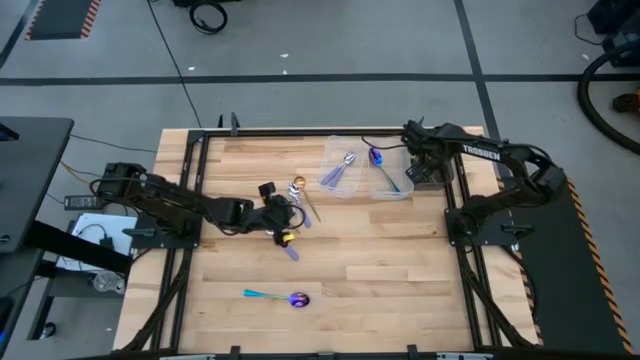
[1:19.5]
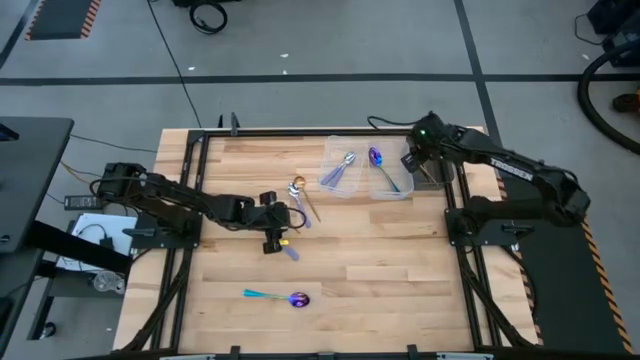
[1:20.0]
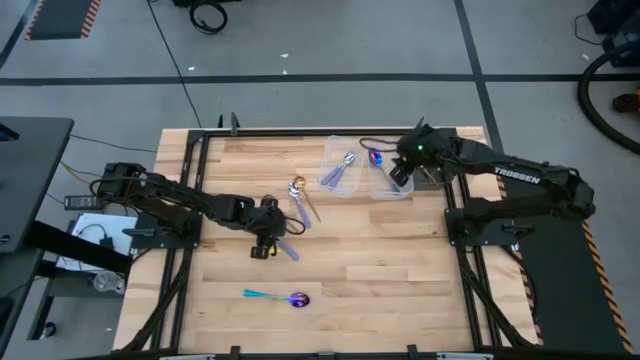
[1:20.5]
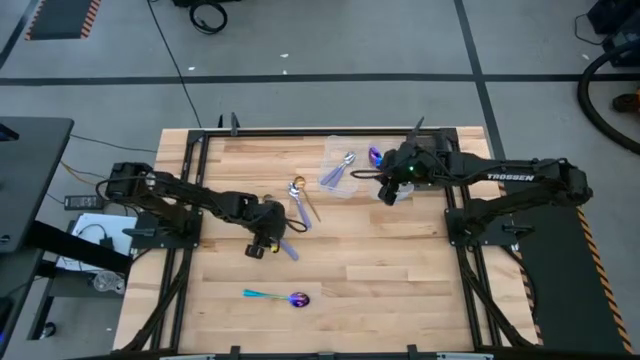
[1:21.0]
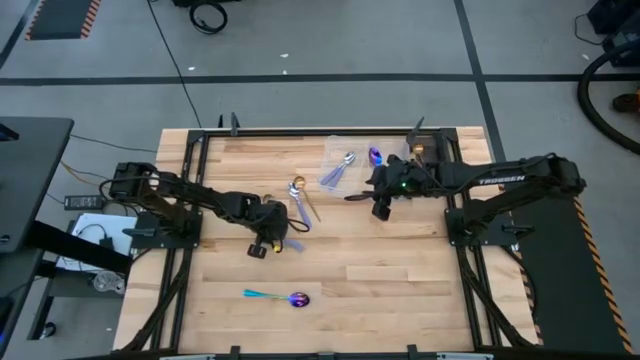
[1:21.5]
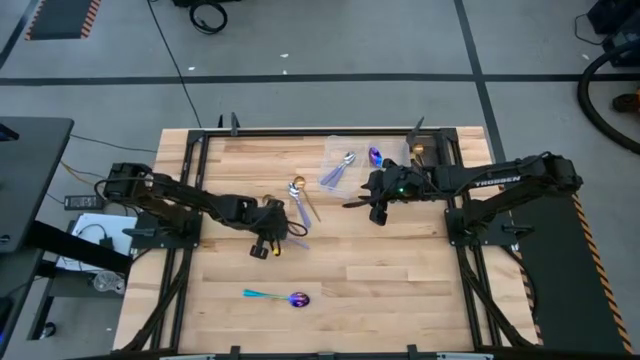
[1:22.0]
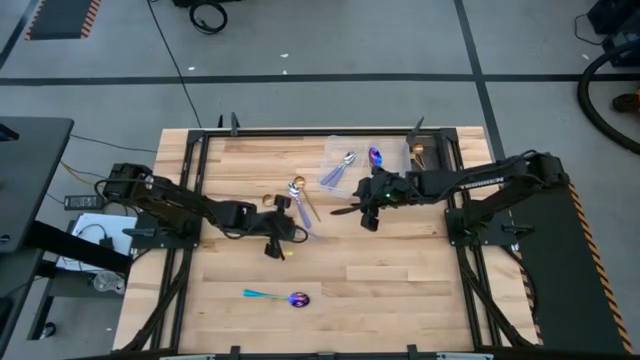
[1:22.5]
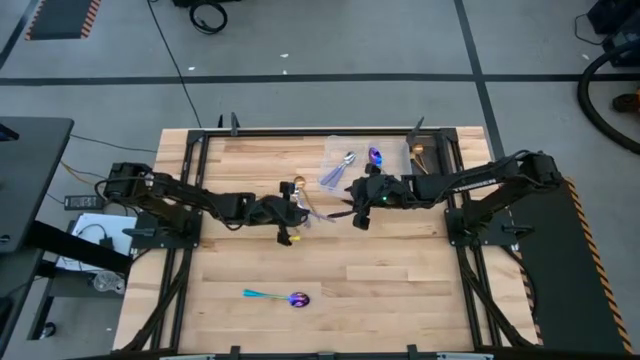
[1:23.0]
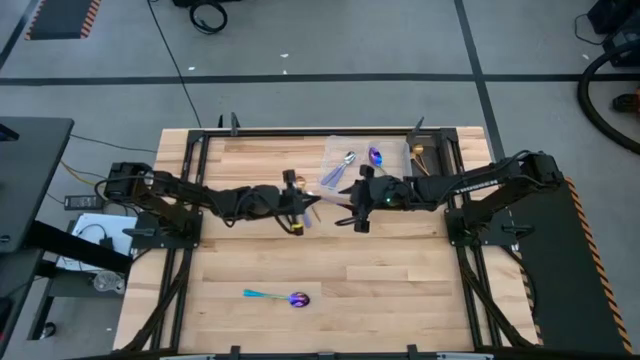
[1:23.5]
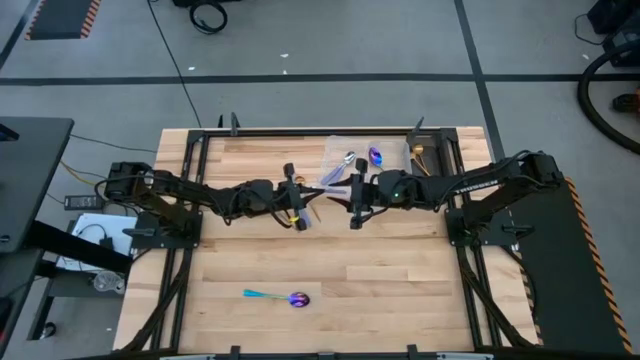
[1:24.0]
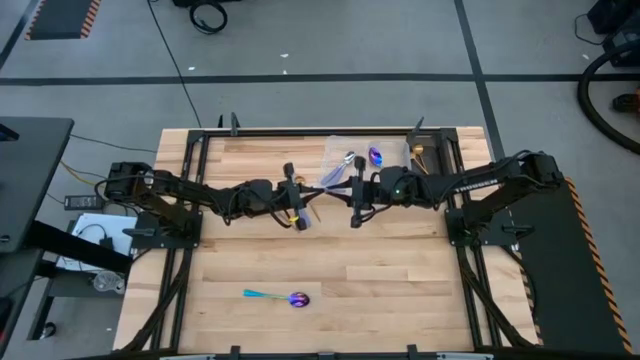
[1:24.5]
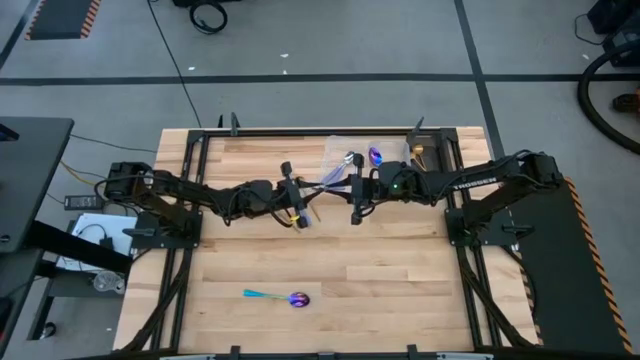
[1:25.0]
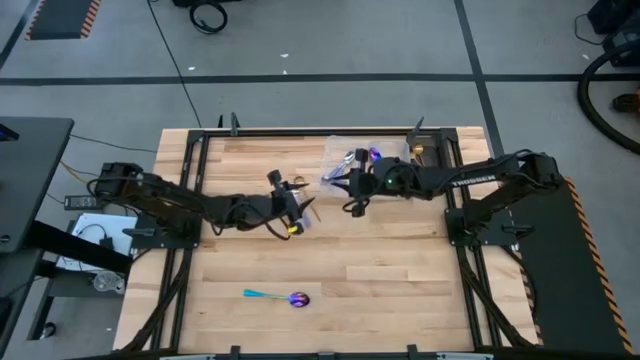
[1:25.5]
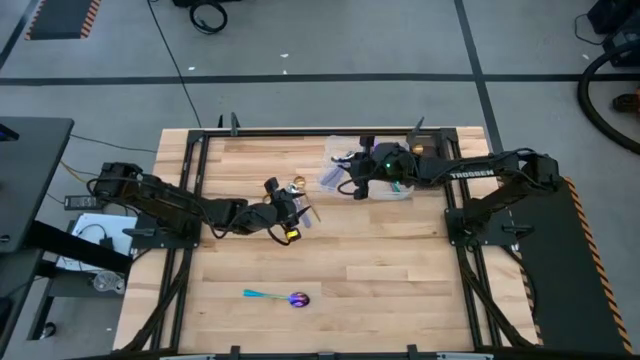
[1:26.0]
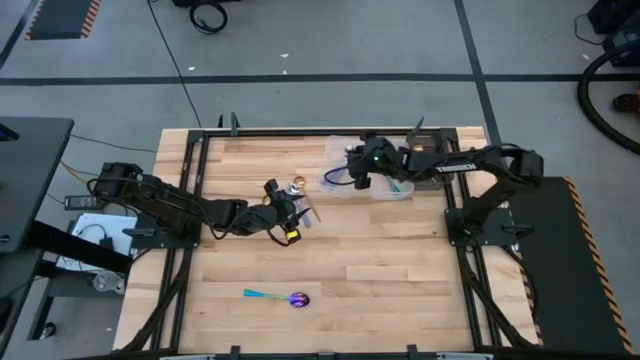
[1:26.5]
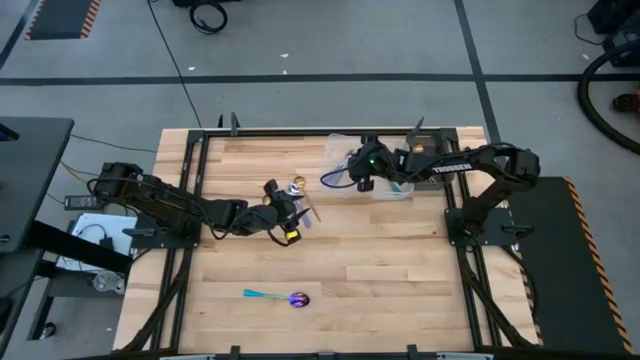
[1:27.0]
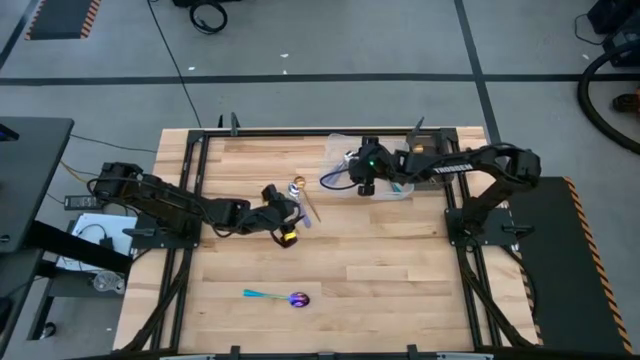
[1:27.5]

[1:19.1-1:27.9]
Task: Sort silverware by color (type)
Put the left gray spoon into the left transparent bin

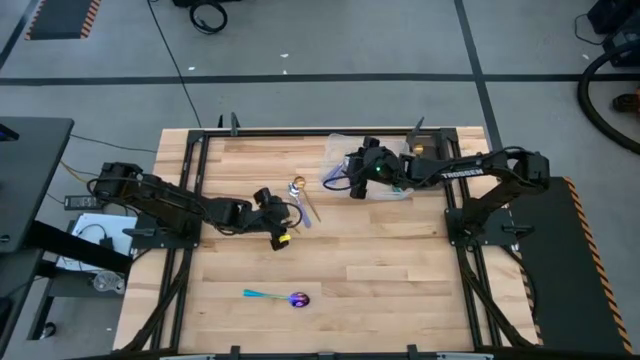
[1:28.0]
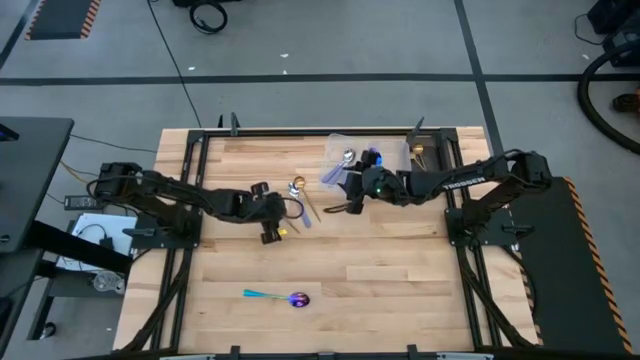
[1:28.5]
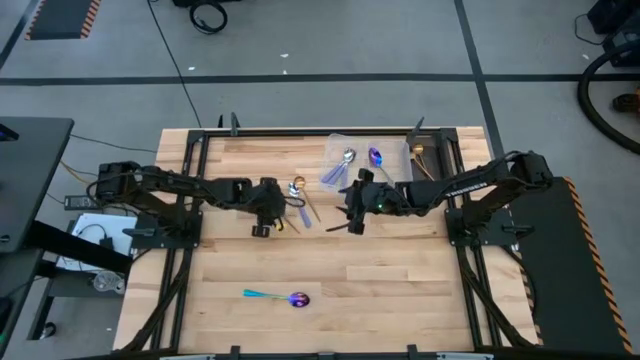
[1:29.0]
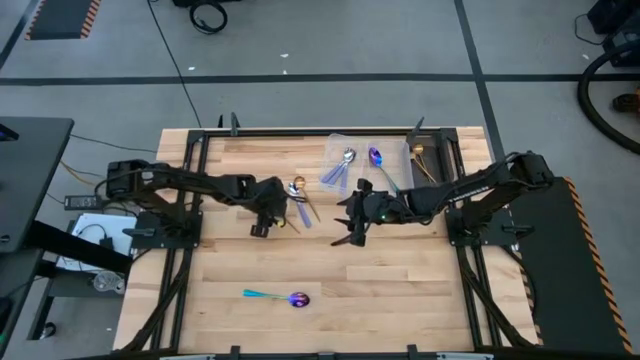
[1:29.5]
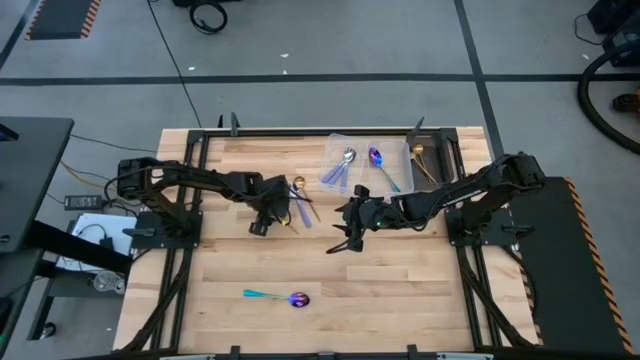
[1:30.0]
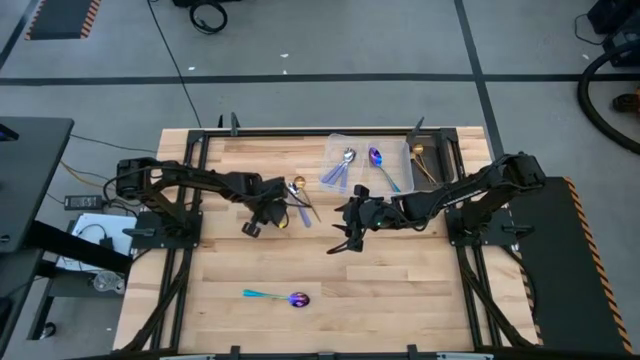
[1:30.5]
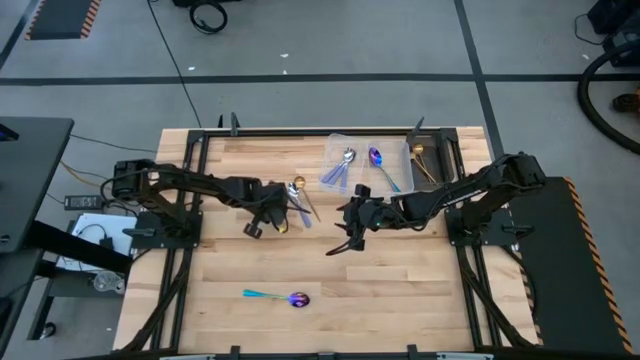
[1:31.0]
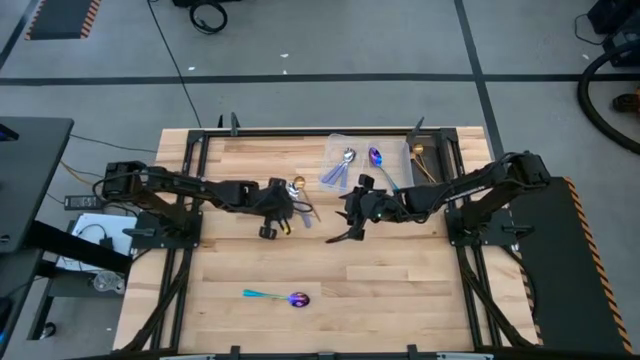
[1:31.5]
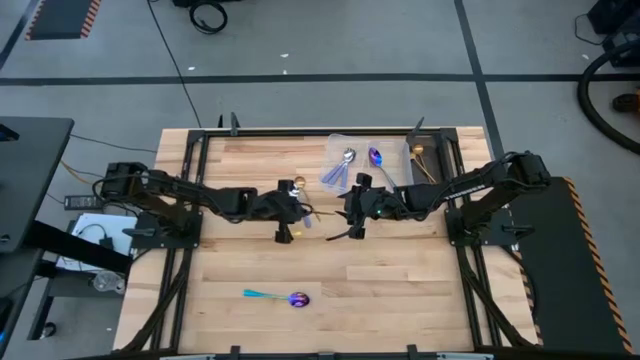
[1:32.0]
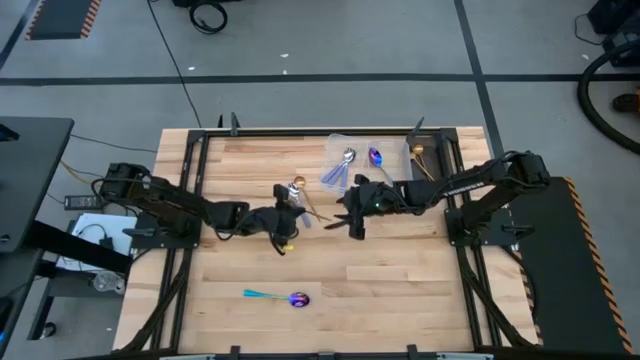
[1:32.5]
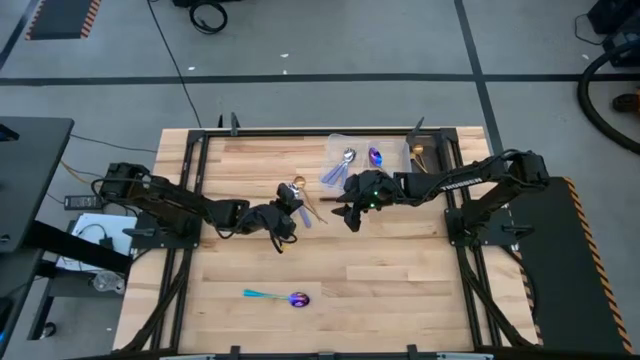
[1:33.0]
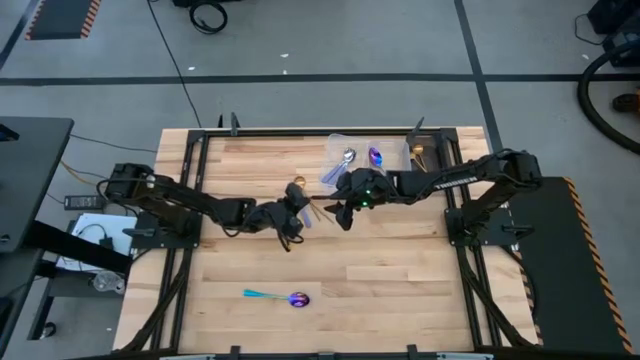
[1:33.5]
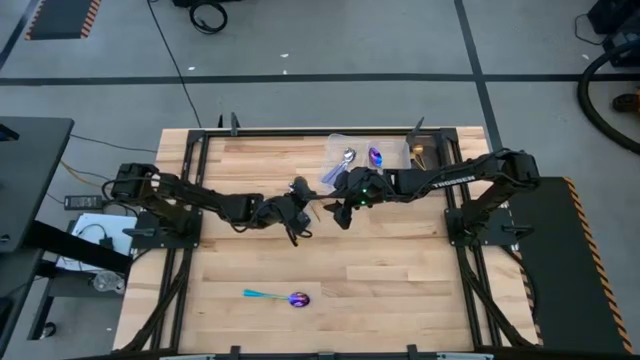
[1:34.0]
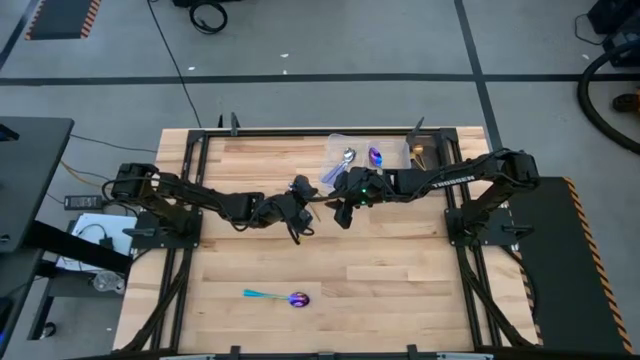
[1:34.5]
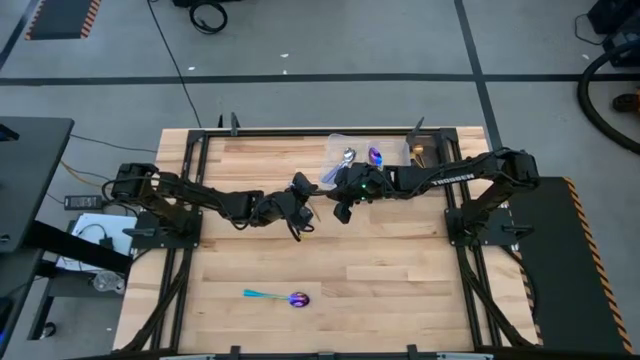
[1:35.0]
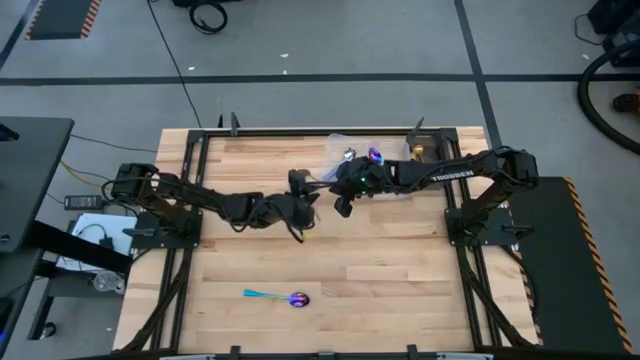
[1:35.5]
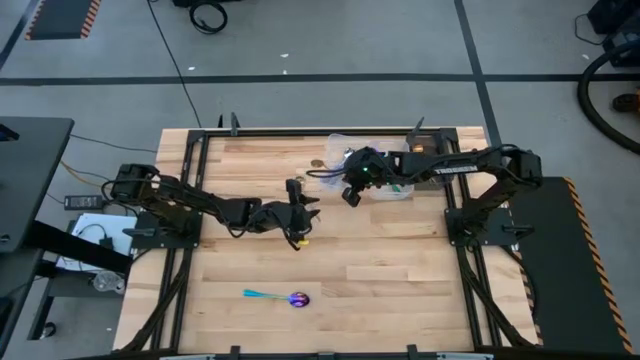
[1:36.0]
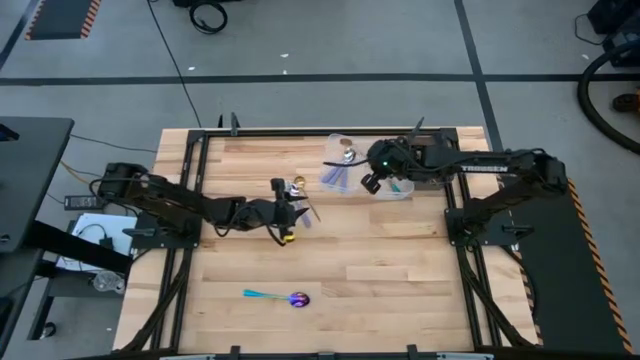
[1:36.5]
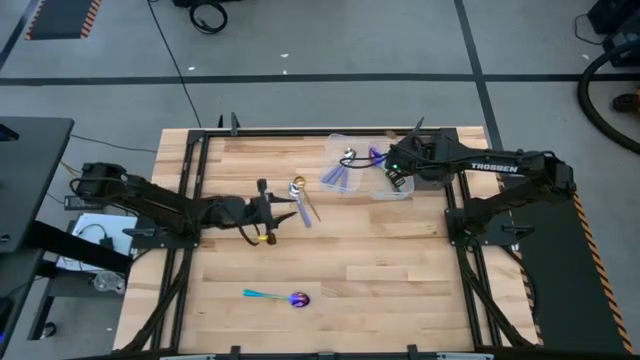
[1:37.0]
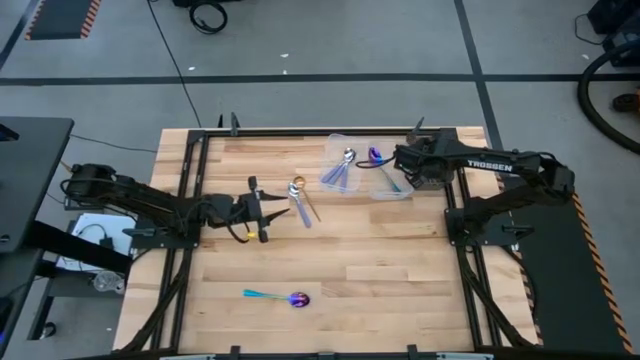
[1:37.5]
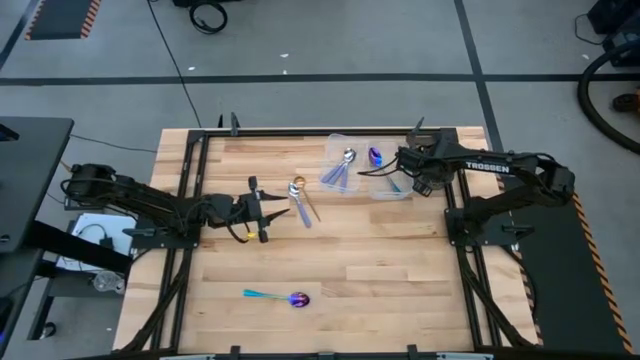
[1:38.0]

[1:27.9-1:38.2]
Put the left golden spoon into the black bin

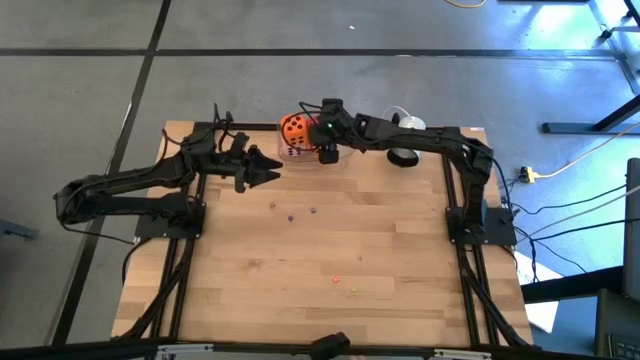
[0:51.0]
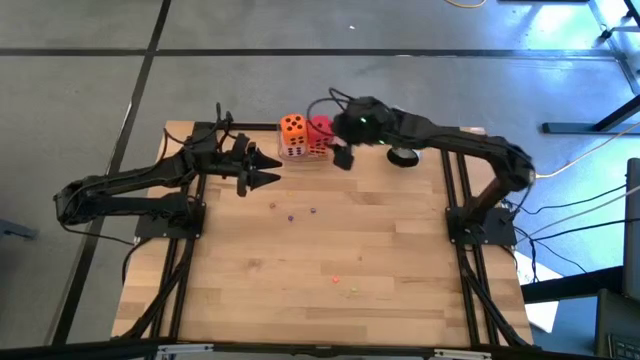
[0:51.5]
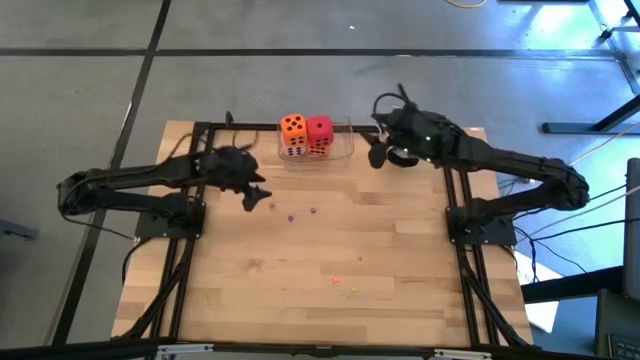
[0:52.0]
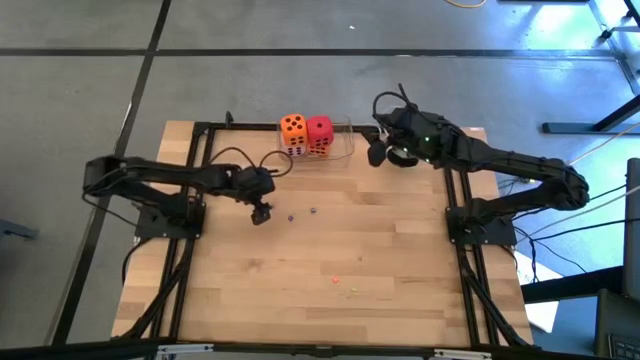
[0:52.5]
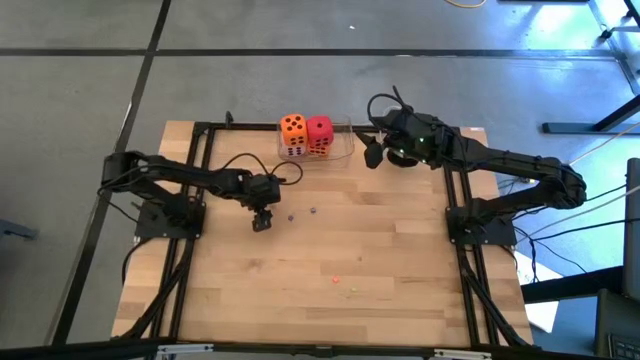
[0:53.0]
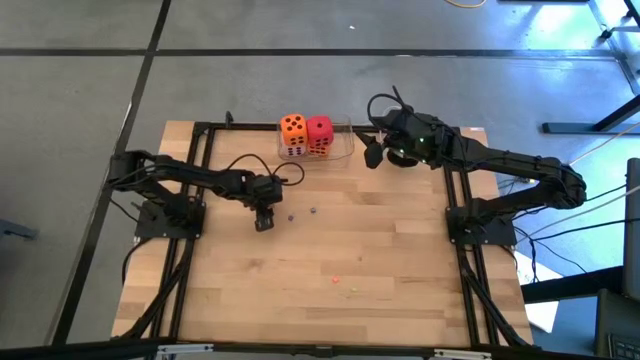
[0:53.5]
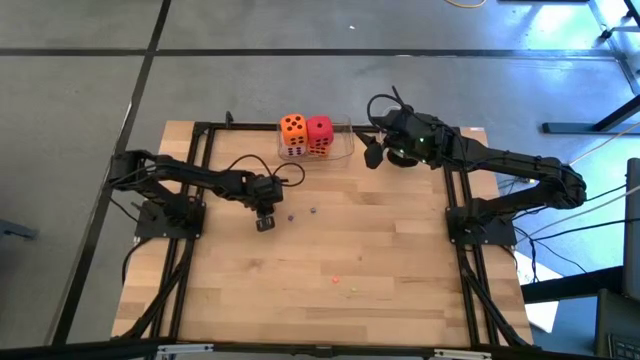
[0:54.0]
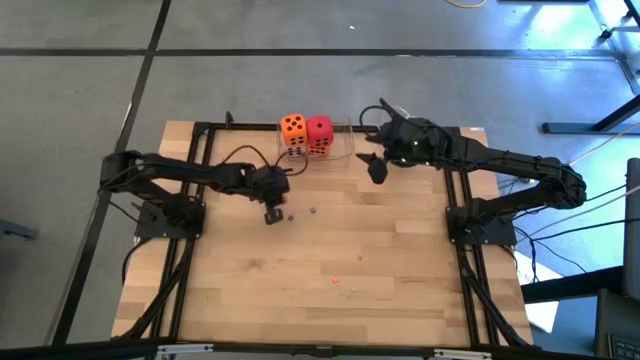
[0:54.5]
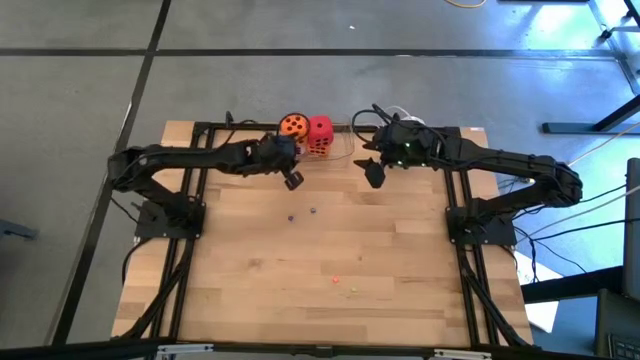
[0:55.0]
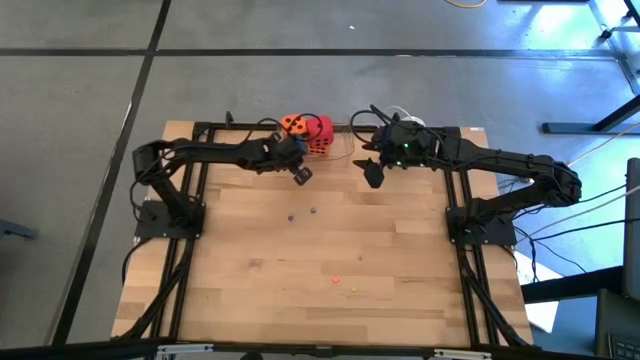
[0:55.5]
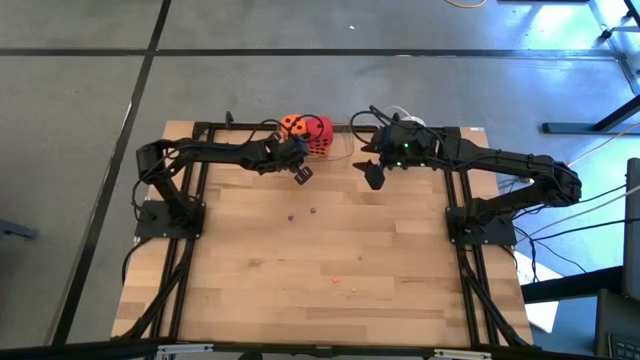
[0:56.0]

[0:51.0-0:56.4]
Task: Pick & Place Dice
Put the small red dice into the transparent bin
